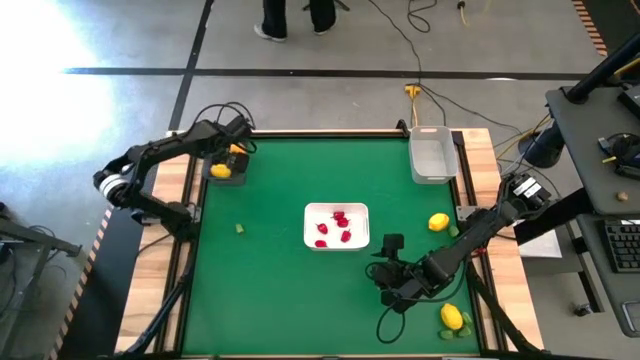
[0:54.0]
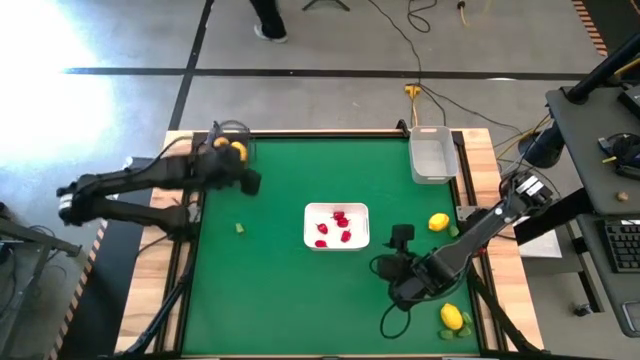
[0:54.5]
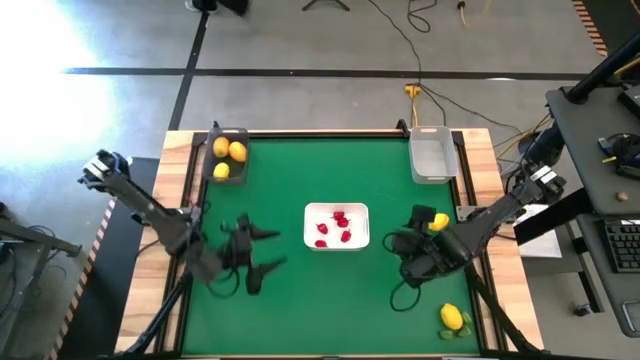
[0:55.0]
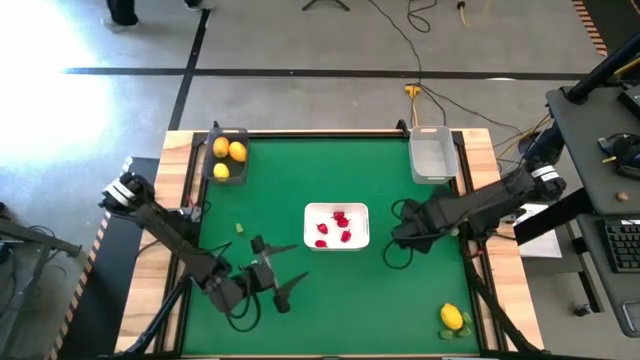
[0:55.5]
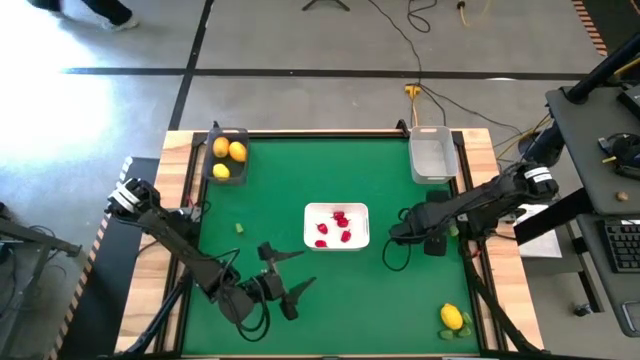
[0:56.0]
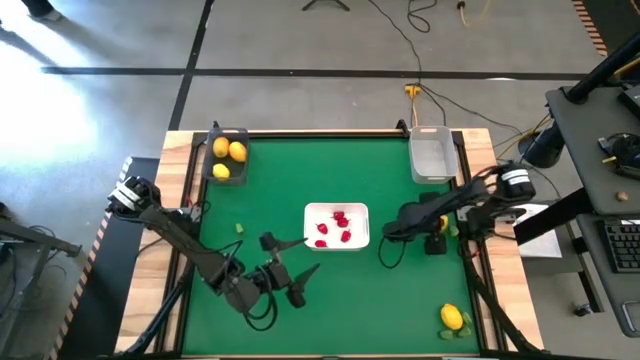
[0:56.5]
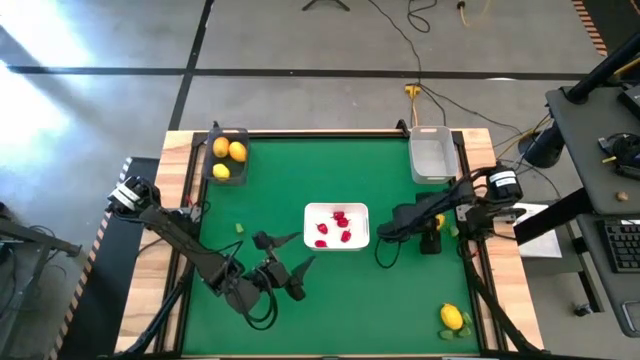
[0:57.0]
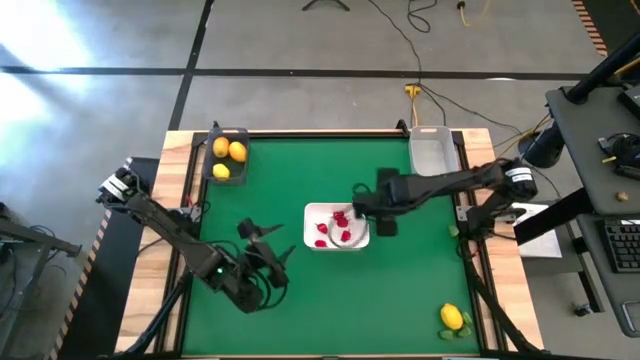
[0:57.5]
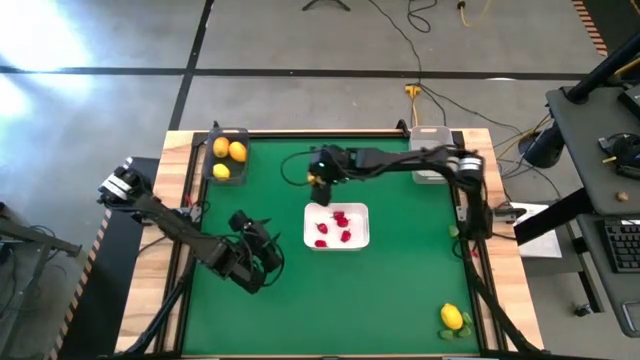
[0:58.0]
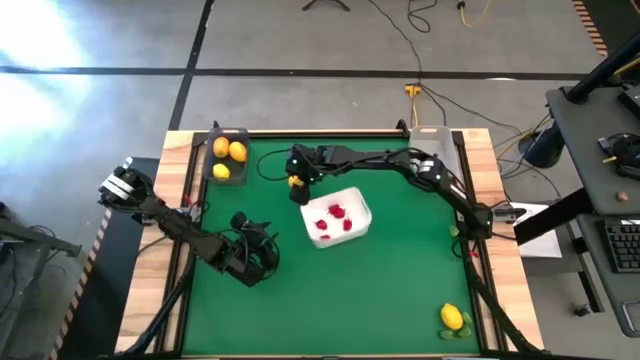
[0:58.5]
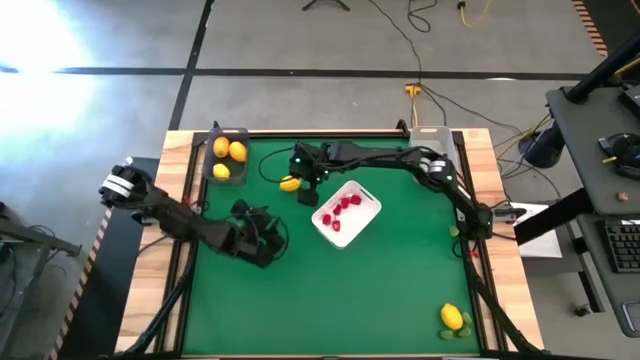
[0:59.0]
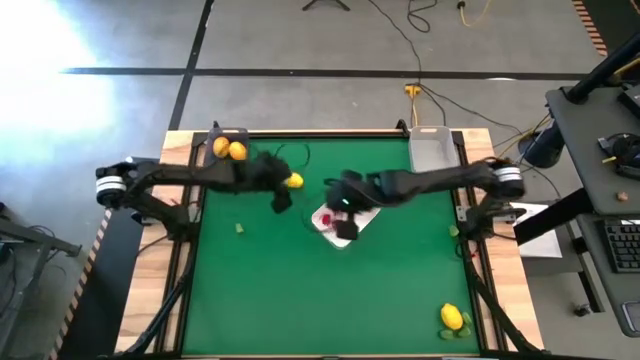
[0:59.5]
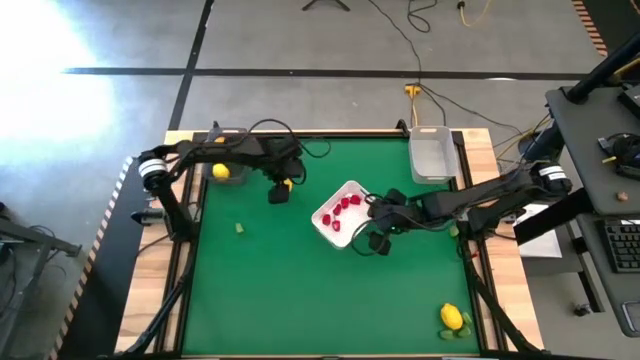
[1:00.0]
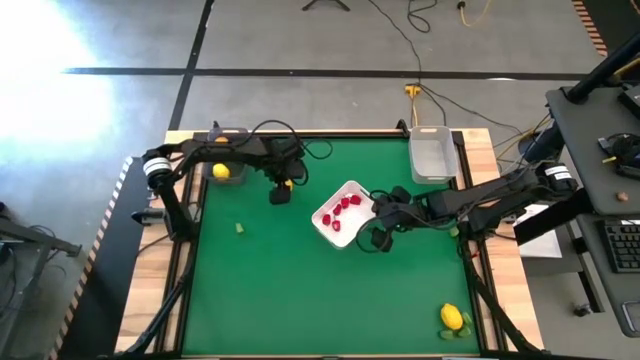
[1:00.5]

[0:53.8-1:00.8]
Task: Sort produce into baskets
Put the yellow lemon into the black bin

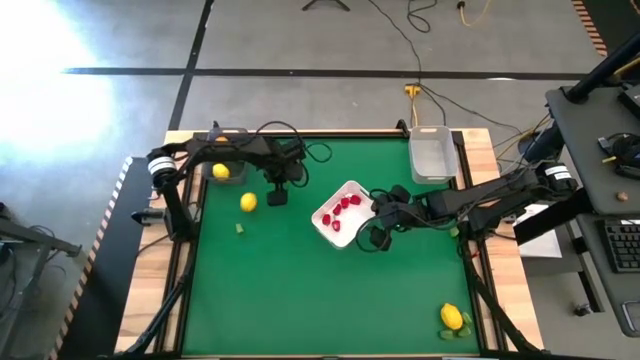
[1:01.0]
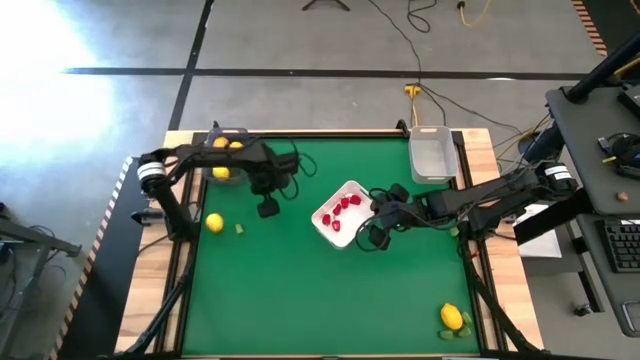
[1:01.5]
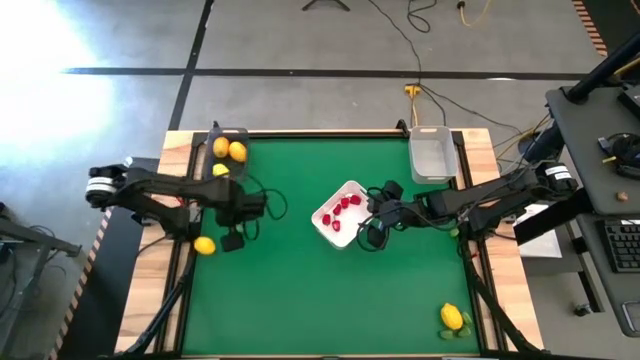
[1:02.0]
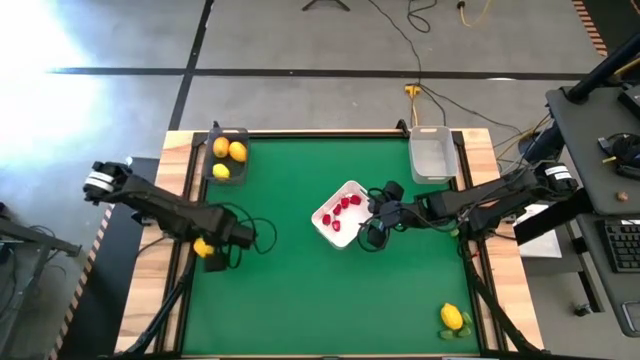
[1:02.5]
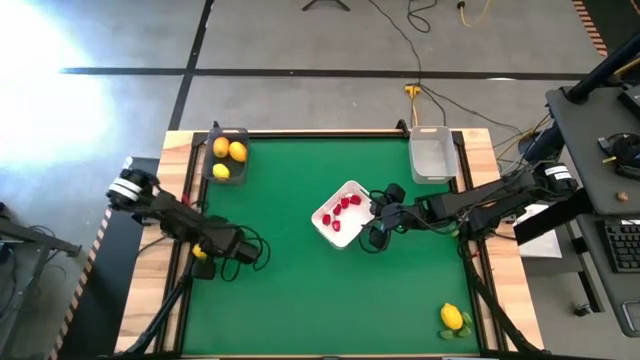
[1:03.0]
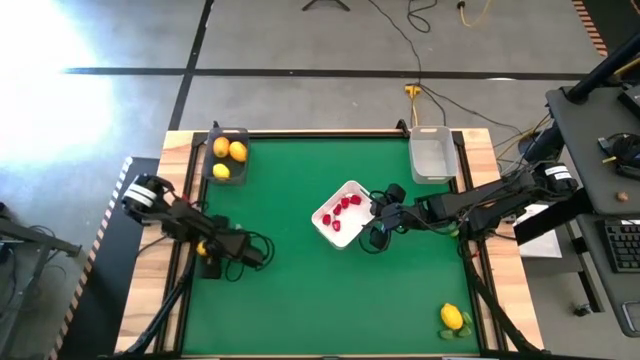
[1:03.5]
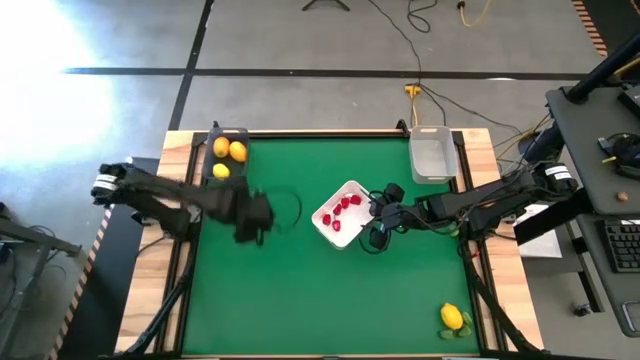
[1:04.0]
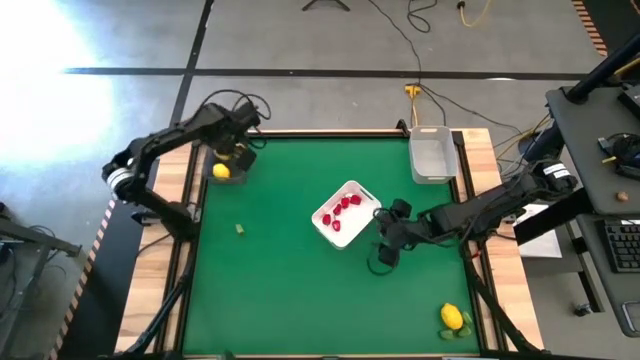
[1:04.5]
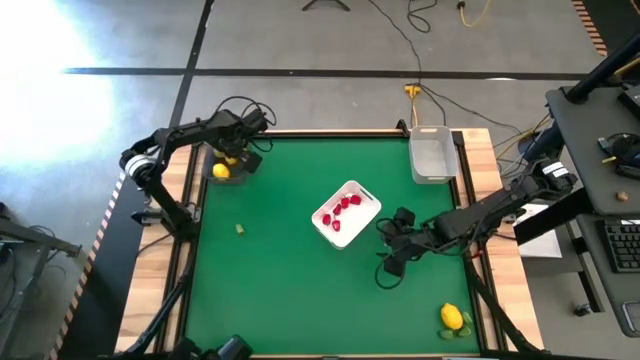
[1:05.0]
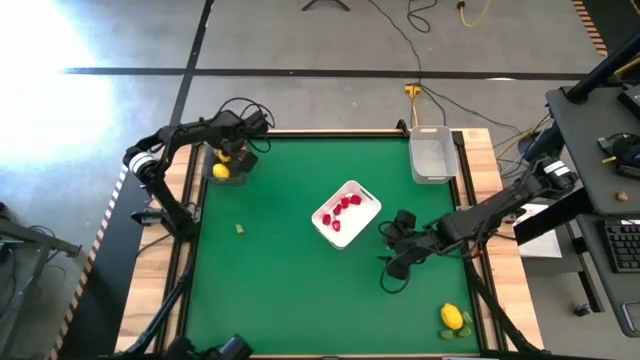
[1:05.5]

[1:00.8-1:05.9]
Put the yellow lemon into the black bin

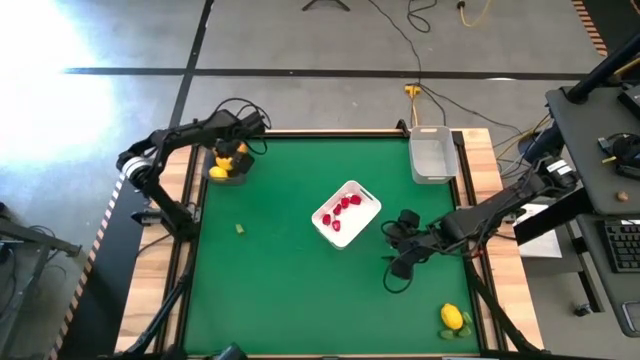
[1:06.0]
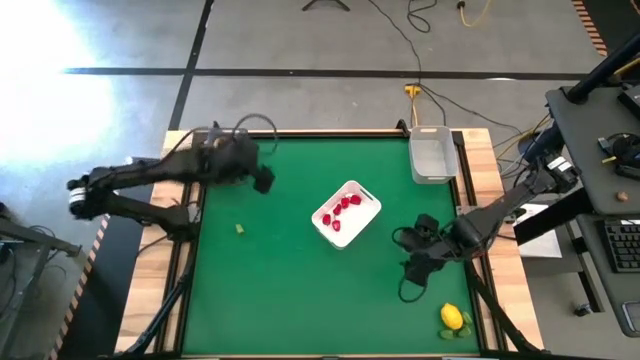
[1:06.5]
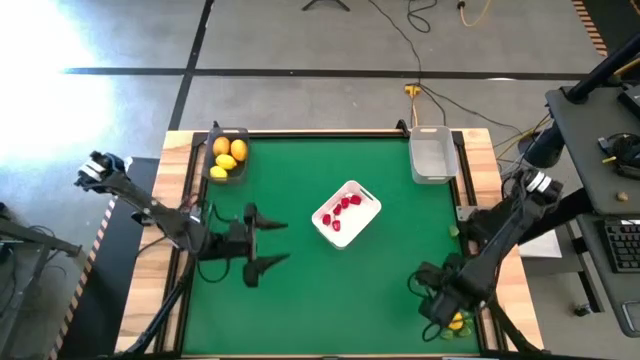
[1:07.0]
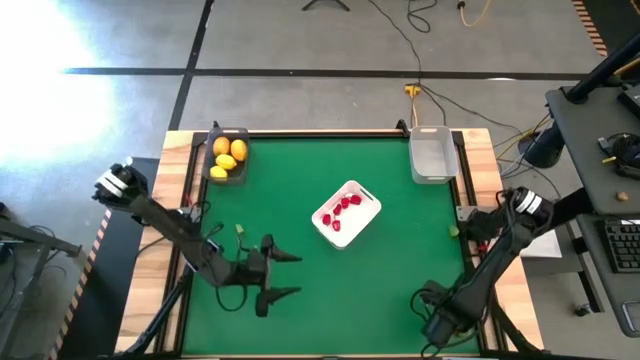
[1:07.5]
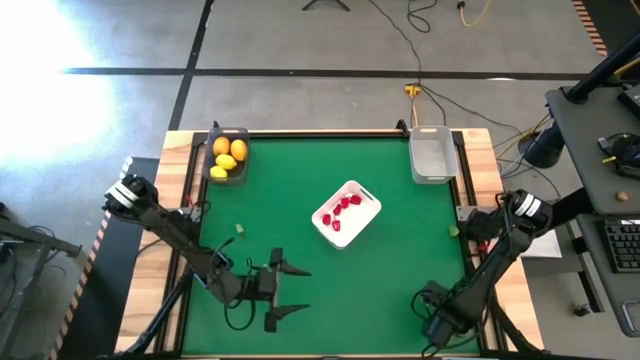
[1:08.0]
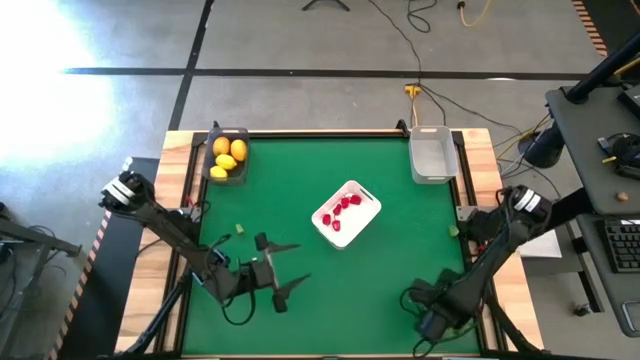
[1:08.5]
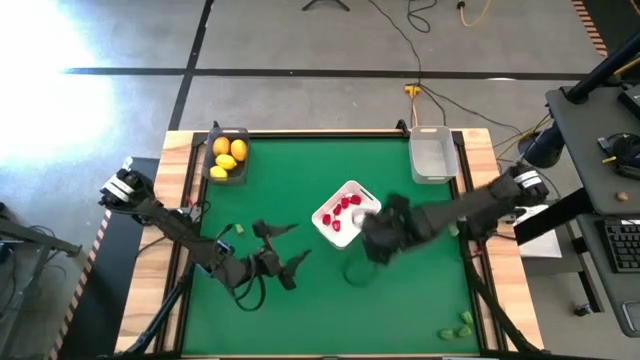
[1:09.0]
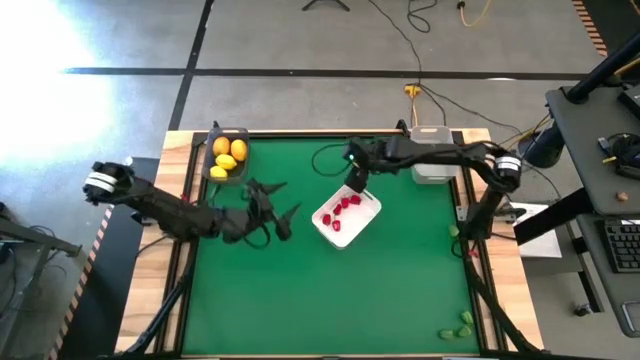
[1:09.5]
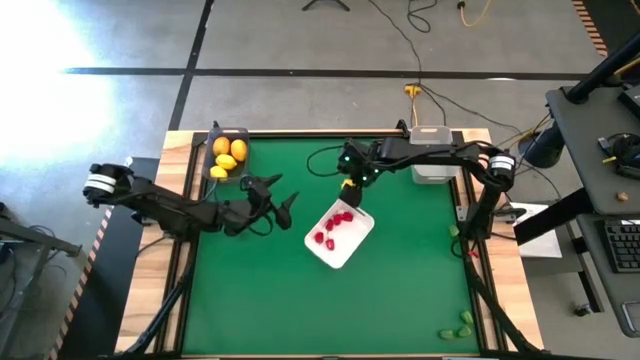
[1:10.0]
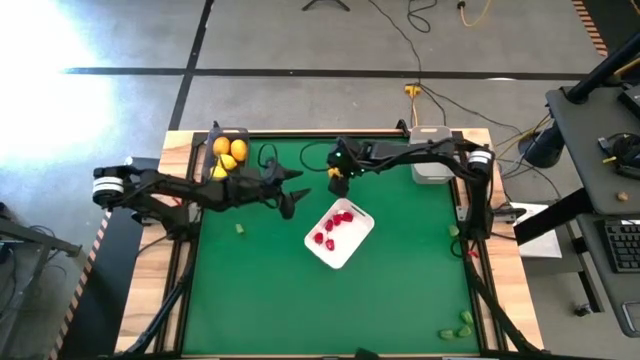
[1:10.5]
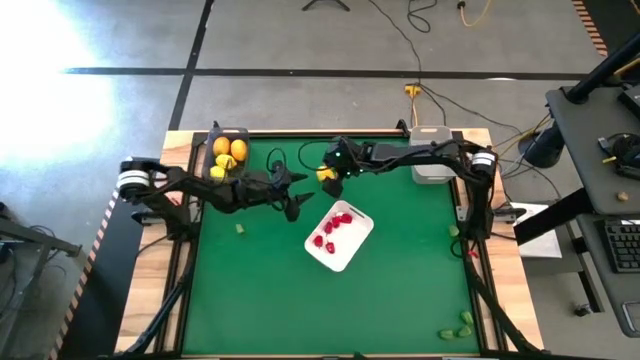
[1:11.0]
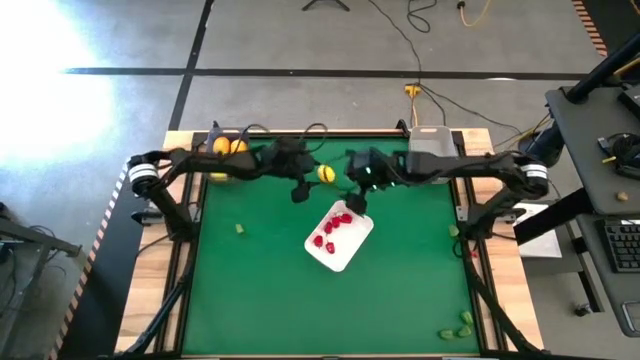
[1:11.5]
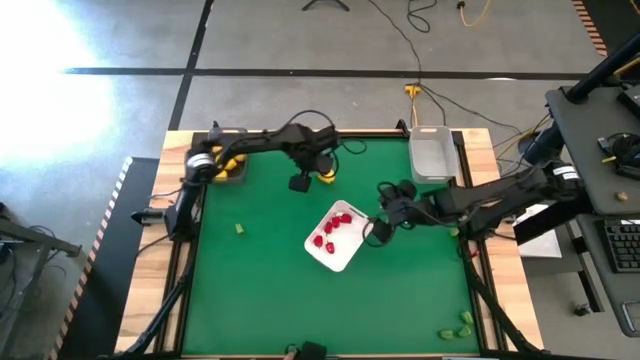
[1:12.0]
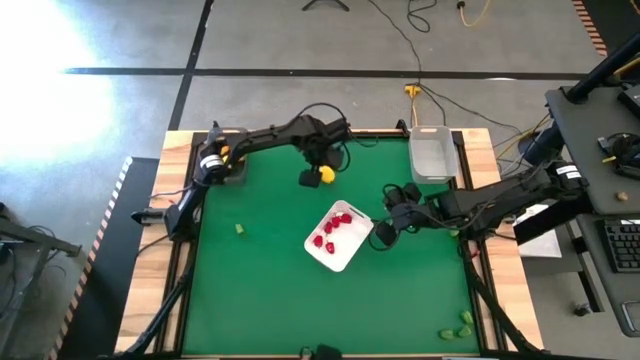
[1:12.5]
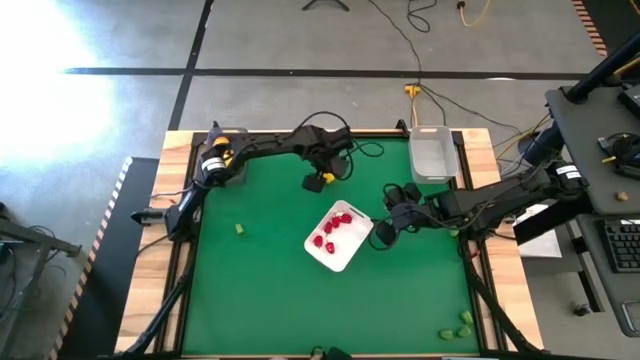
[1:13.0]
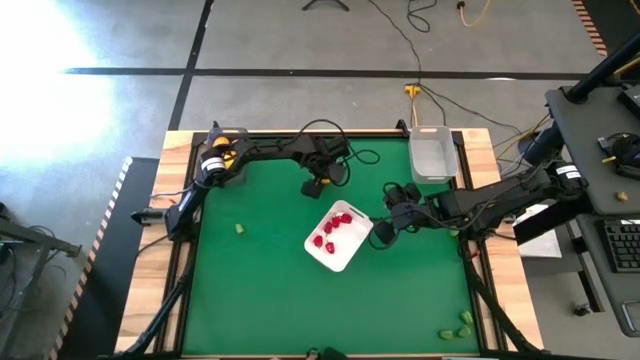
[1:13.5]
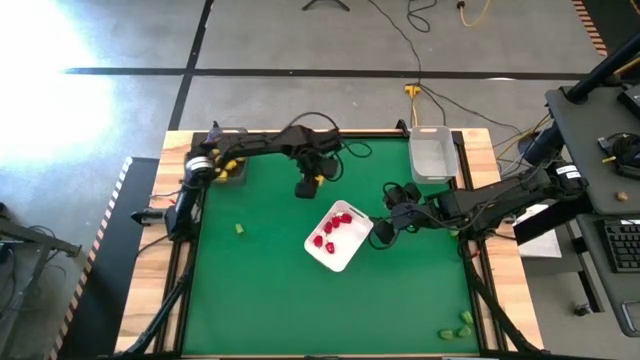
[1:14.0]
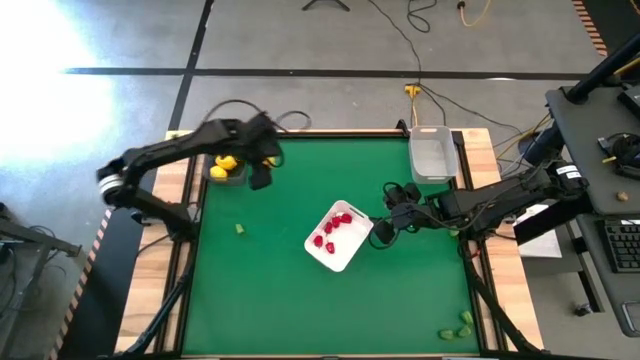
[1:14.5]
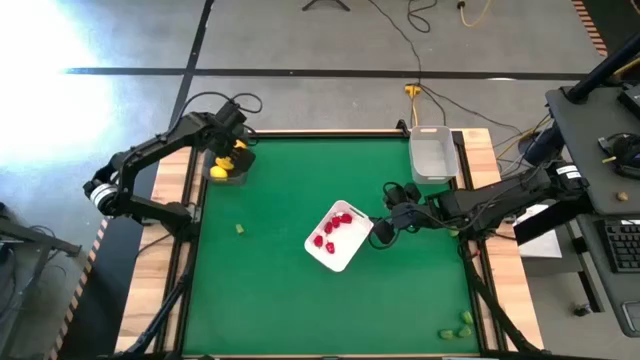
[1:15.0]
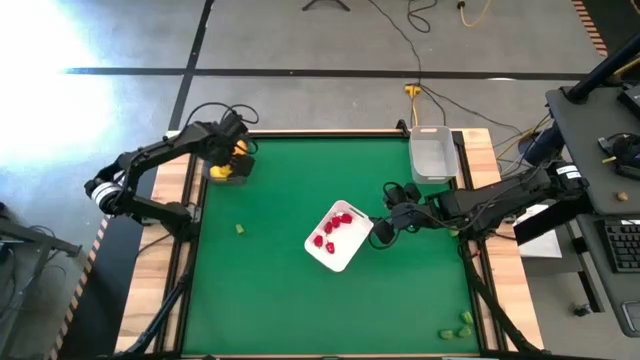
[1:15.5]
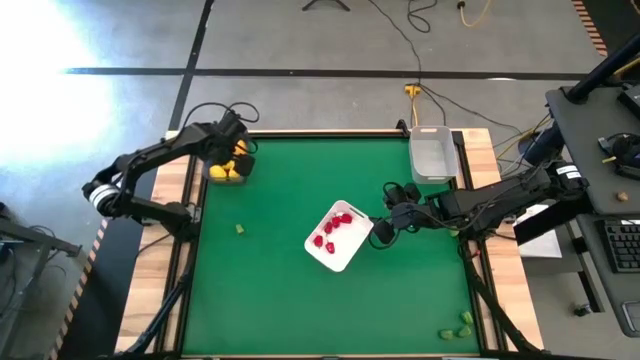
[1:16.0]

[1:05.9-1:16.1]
Put the yellow lemon into the black bin
